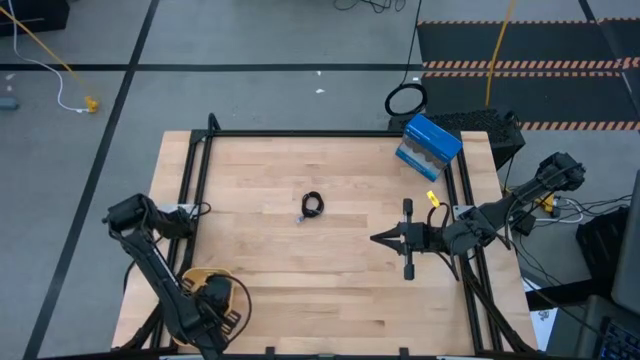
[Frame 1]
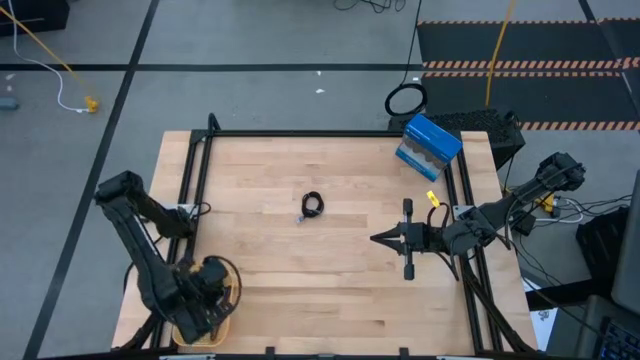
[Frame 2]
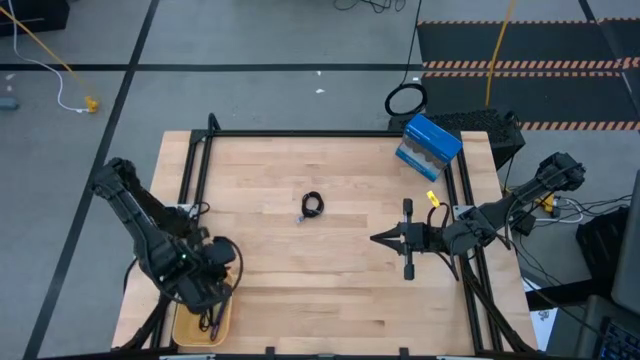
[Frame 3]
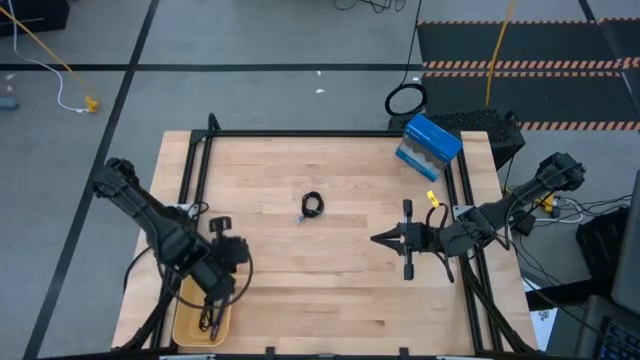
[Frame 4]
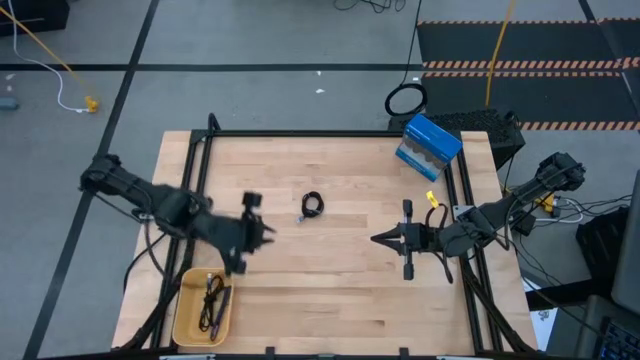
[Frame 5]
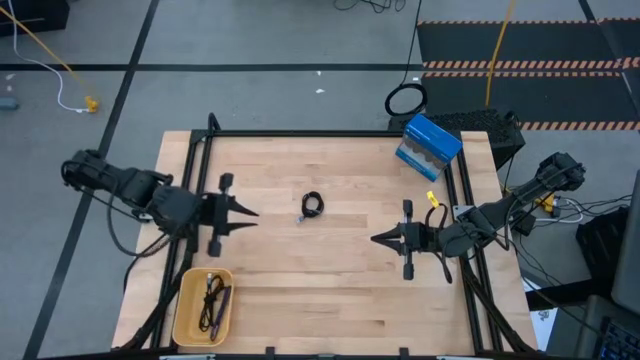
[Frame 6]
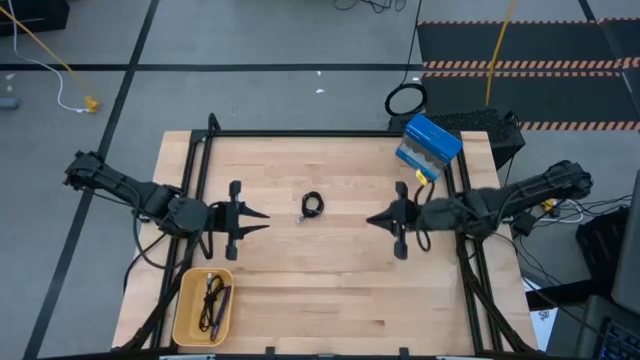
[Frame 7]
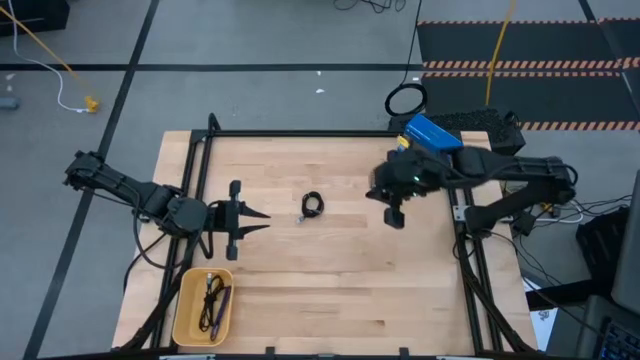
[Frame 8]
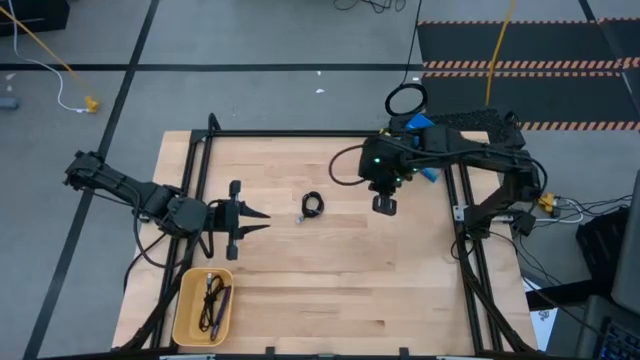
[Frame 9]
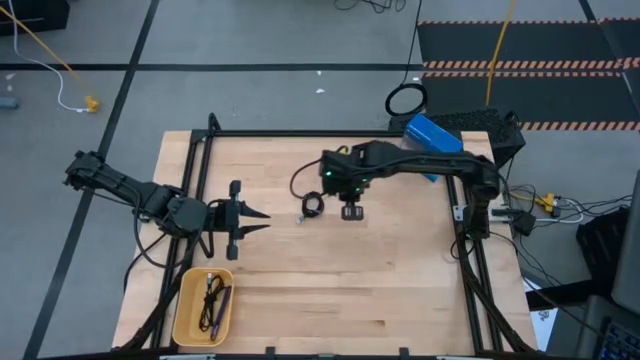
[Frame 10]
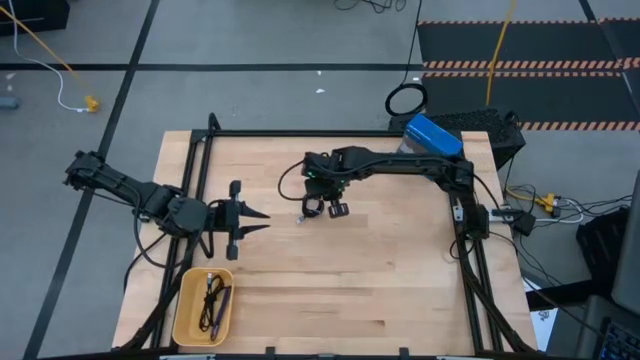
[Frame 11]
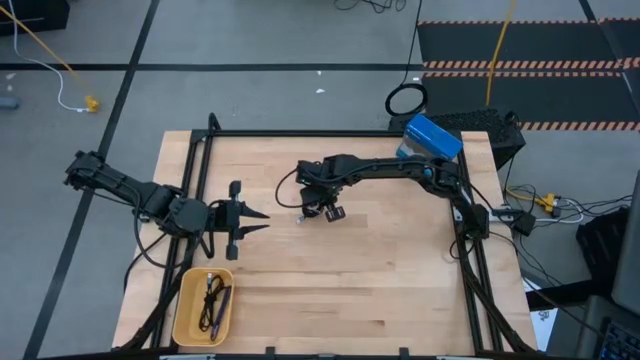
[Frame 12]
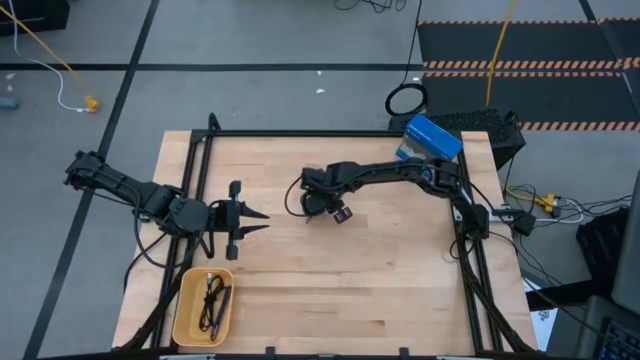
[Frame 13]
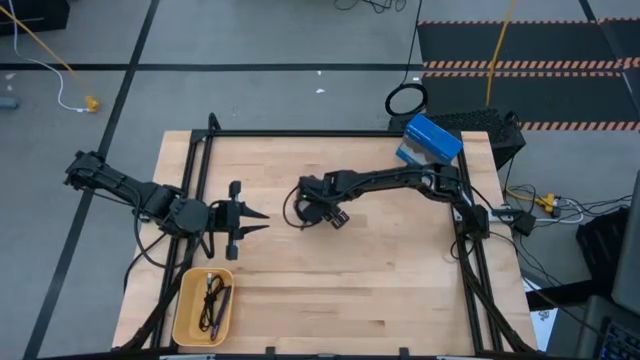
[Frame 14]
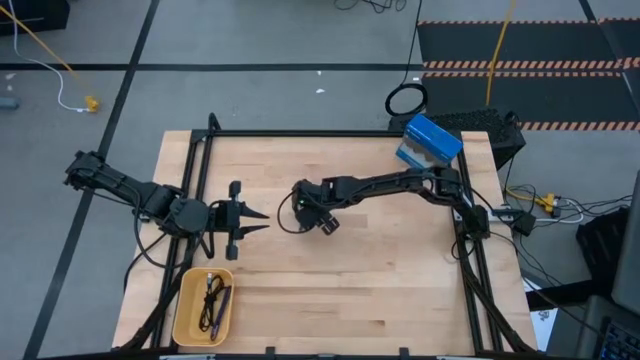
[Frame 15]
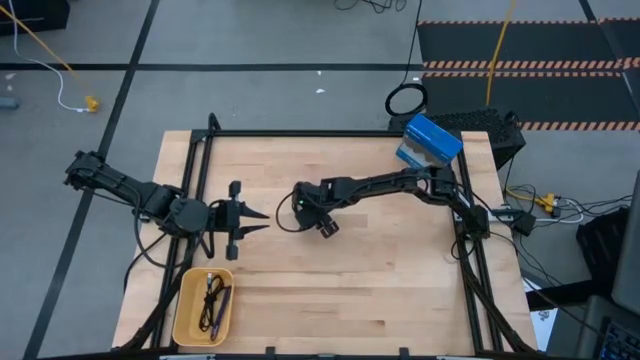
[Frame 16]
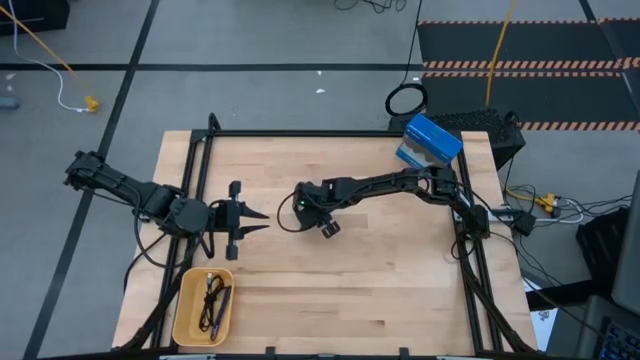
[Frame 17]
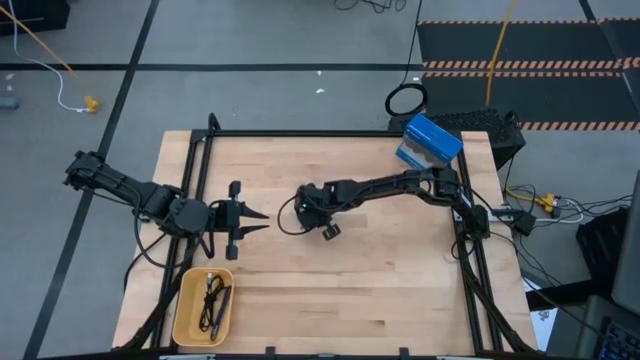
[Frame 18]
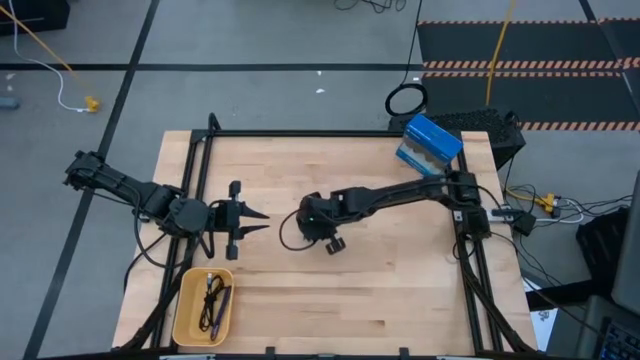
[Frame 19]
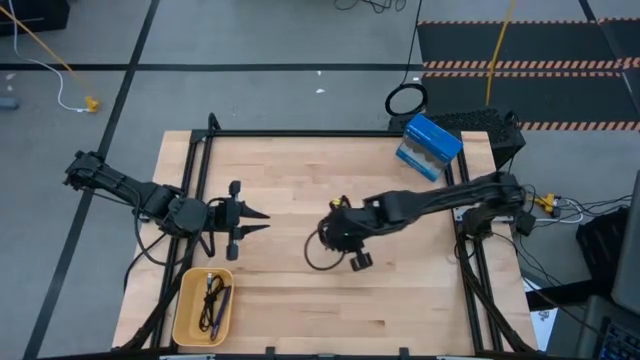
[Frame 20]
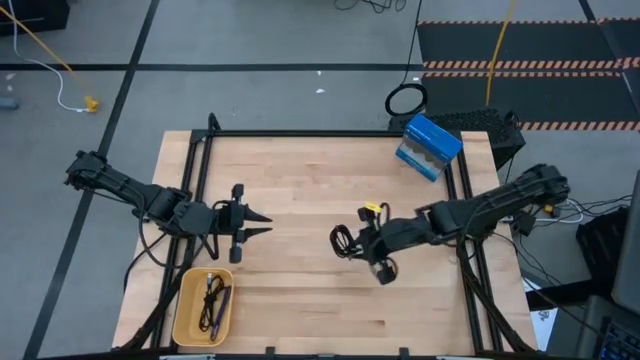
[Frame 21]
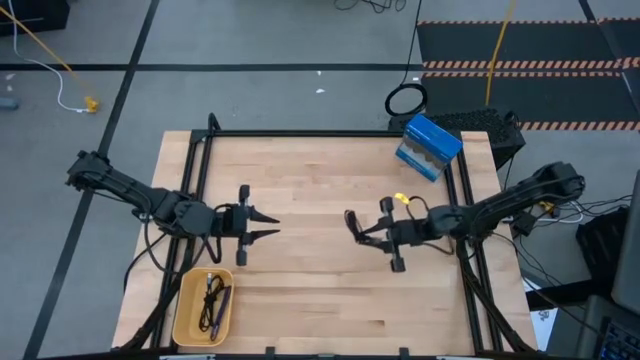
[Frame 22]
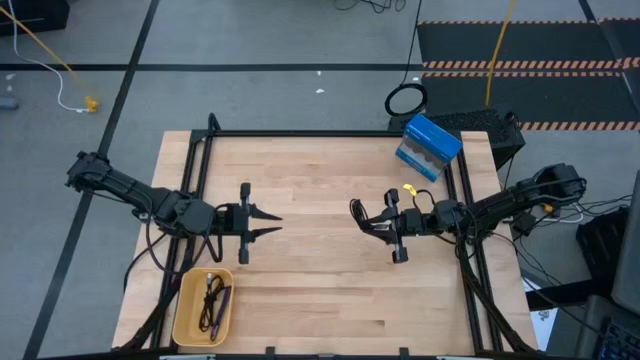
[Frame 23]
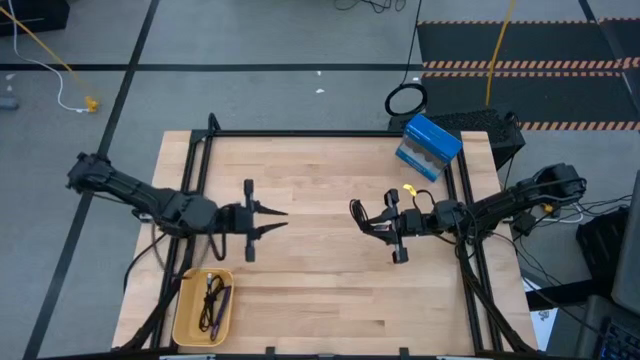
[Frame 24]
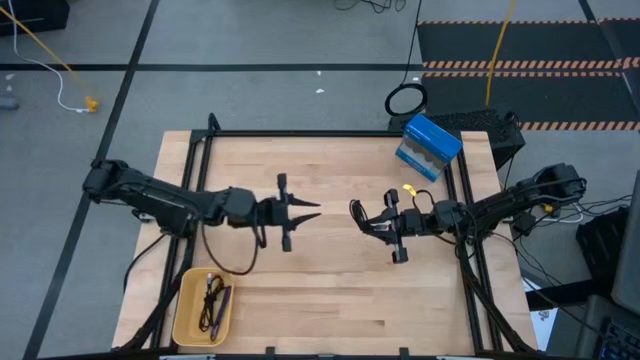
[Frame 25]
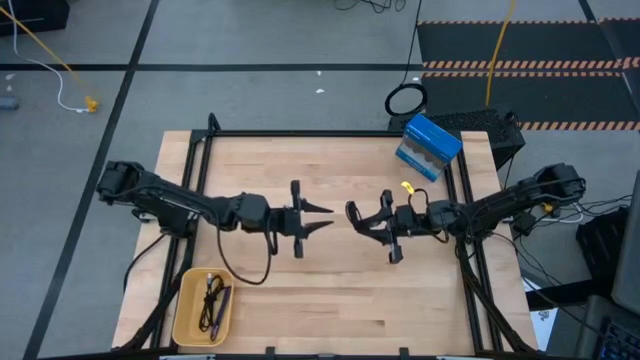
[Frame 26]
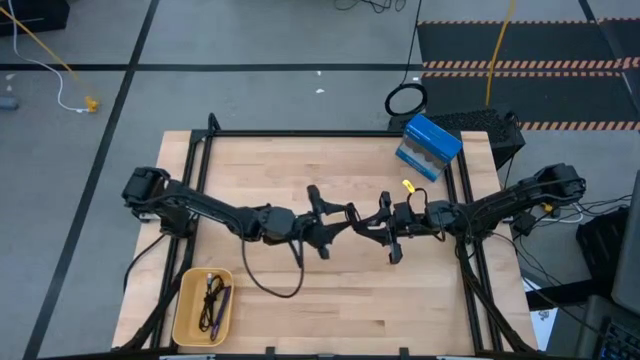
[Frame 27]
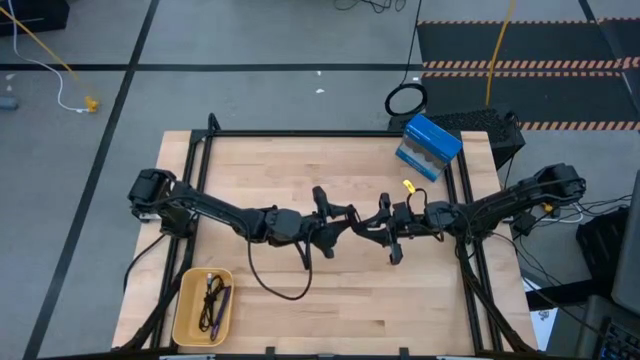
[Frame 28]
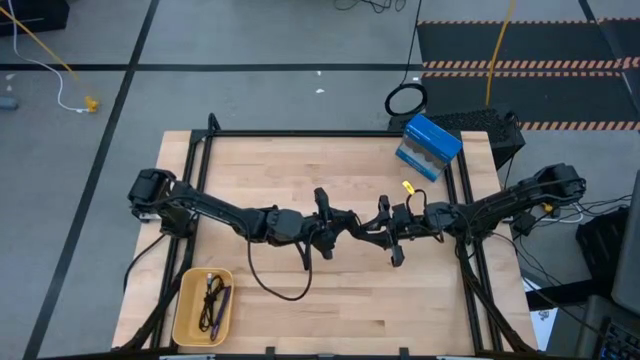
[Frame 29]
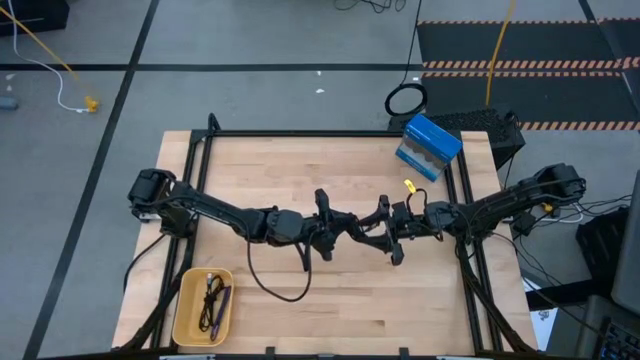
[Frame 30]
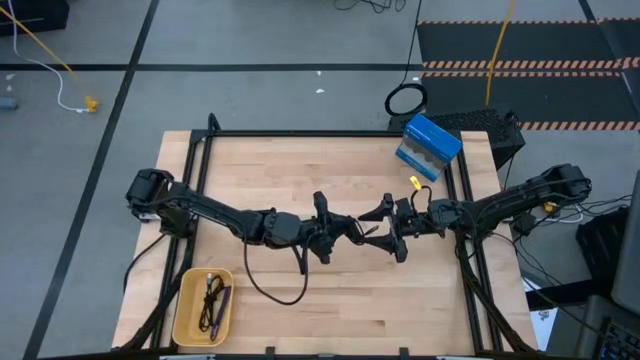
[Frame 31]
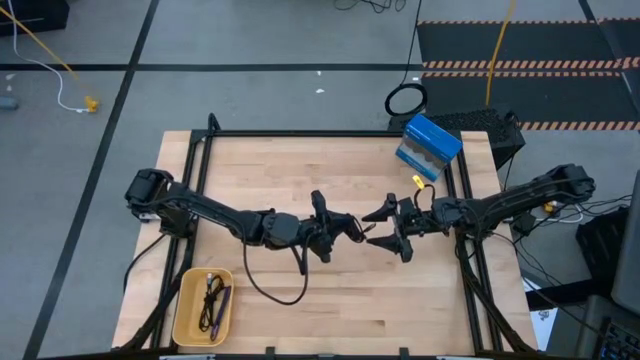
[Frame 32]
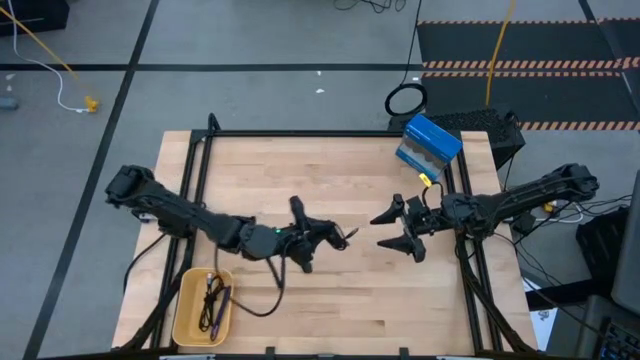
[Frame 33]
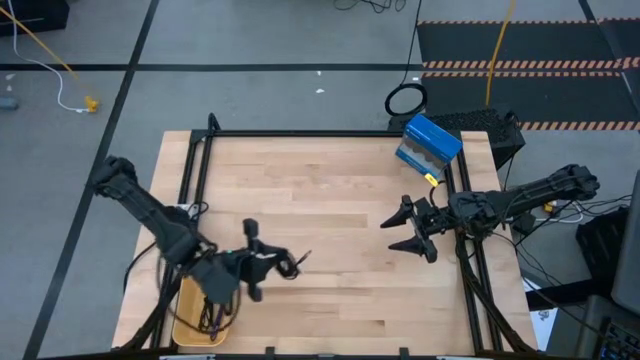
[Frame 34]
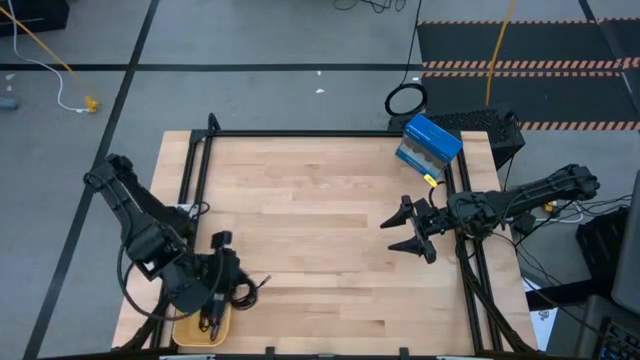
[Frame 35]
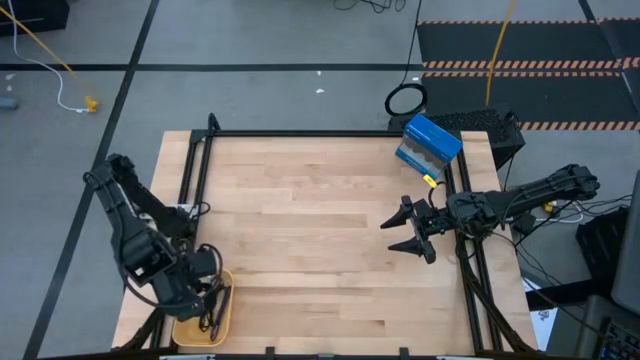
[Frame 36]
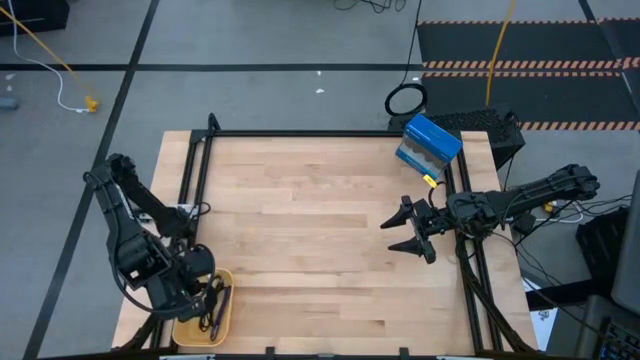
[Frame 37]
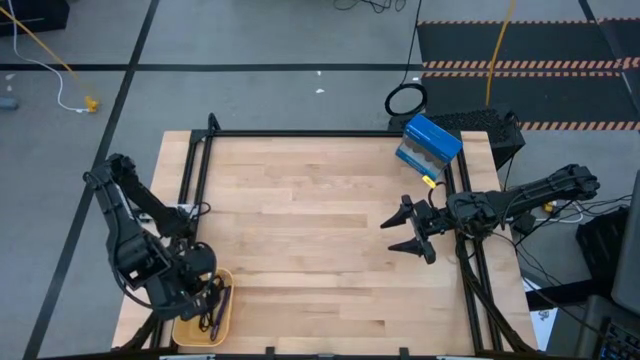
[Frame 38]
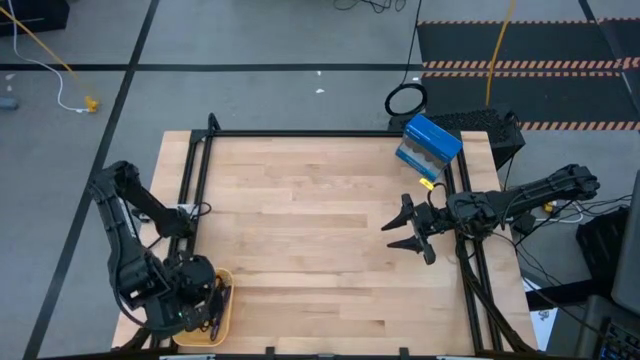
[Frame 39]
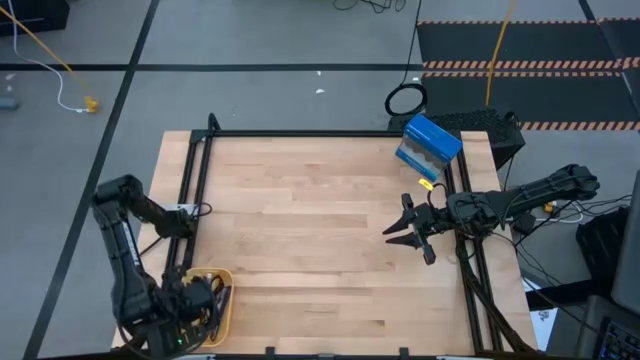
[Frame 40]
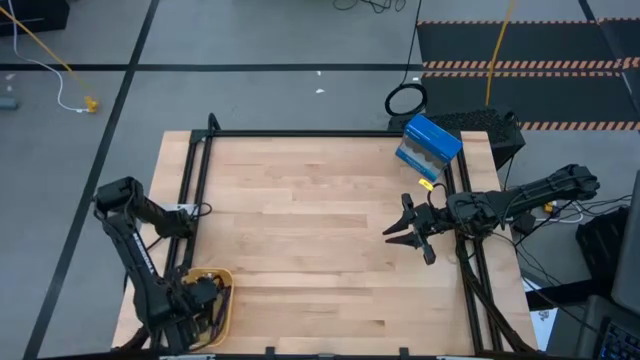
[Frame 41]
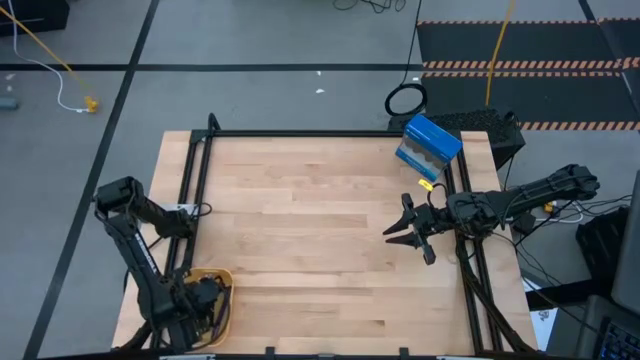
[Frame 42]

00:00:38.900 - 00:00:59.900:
Task: Pick and place USB-C Cables
Put the black charger cable into the yellow bin
